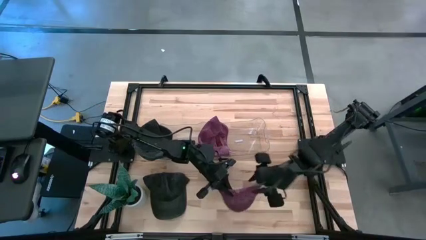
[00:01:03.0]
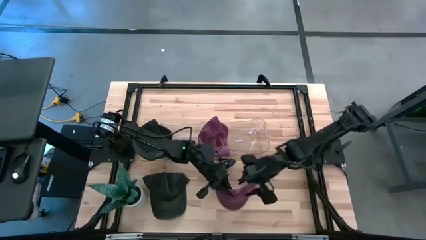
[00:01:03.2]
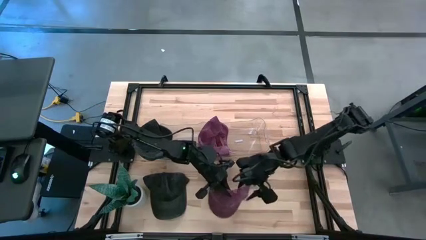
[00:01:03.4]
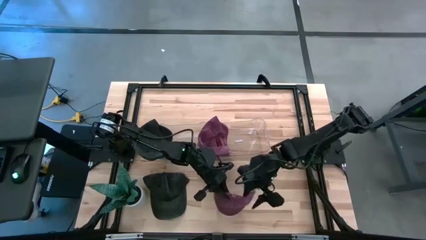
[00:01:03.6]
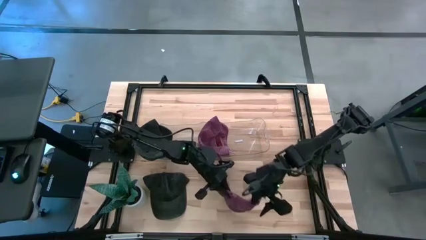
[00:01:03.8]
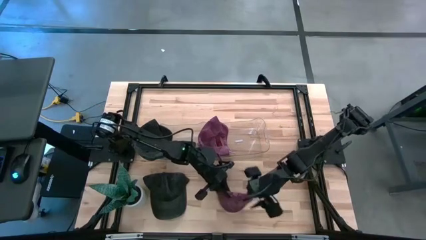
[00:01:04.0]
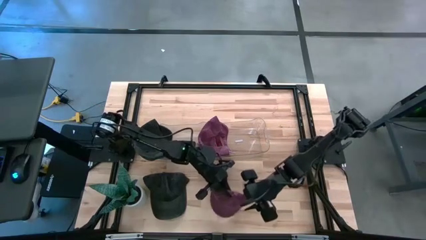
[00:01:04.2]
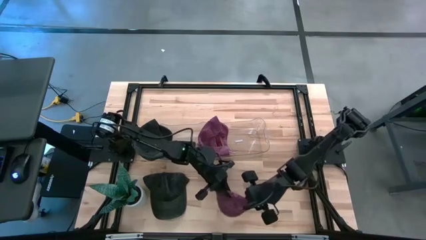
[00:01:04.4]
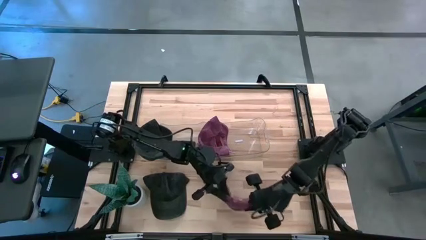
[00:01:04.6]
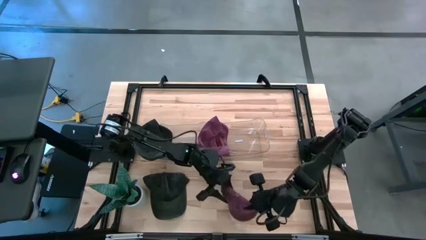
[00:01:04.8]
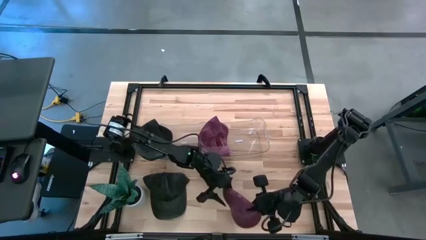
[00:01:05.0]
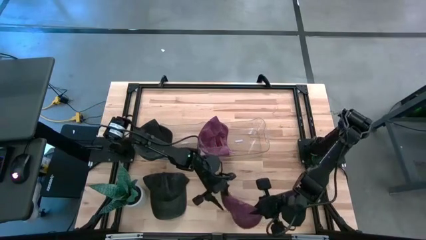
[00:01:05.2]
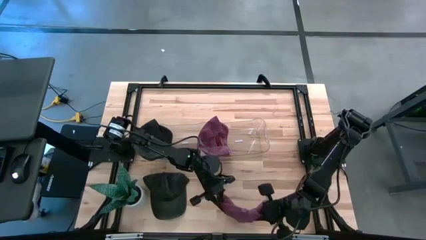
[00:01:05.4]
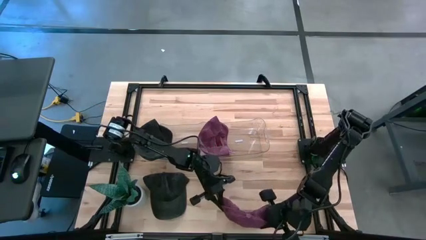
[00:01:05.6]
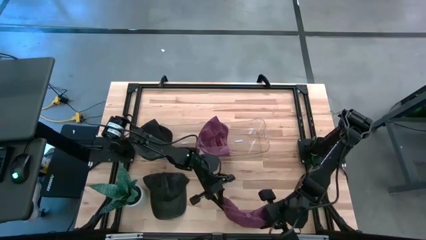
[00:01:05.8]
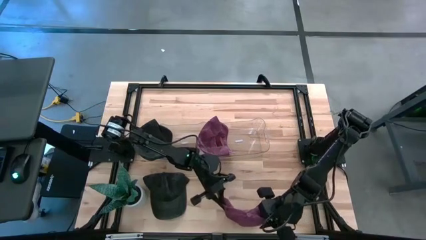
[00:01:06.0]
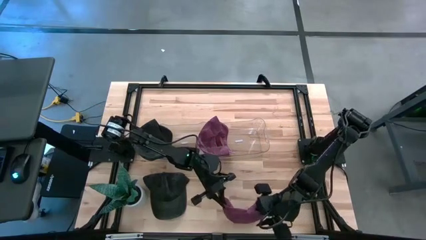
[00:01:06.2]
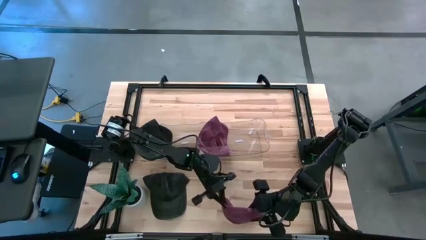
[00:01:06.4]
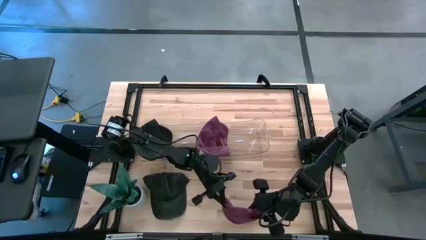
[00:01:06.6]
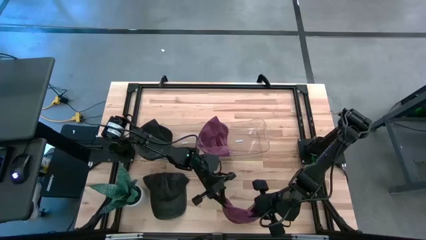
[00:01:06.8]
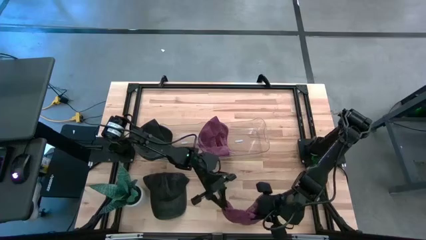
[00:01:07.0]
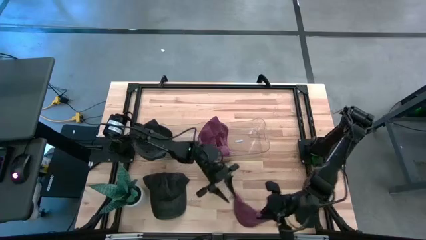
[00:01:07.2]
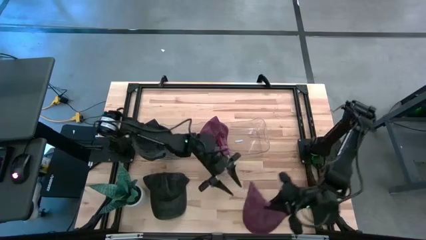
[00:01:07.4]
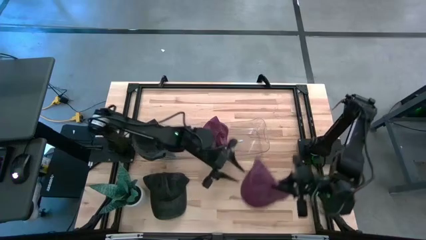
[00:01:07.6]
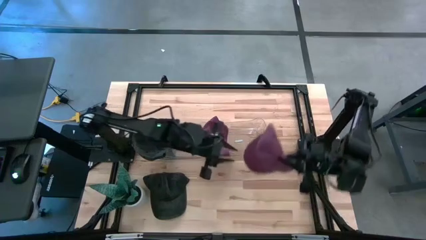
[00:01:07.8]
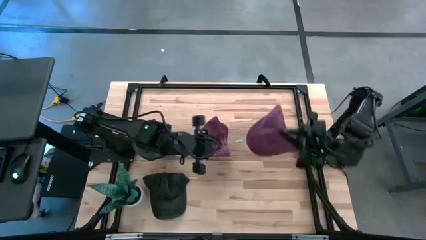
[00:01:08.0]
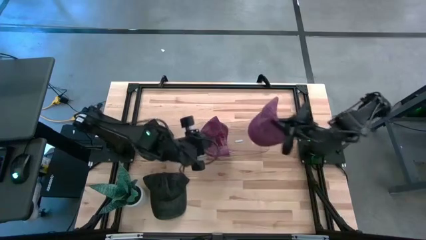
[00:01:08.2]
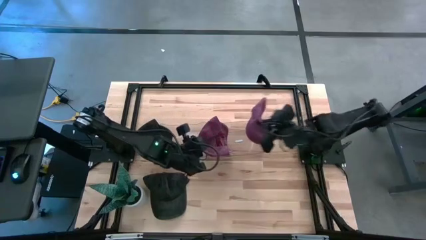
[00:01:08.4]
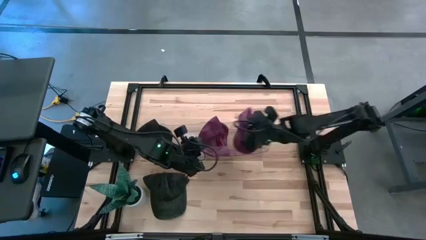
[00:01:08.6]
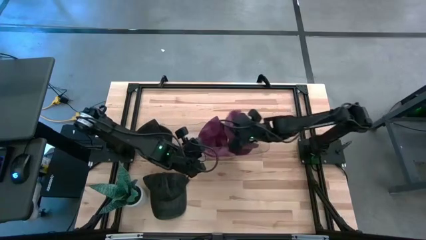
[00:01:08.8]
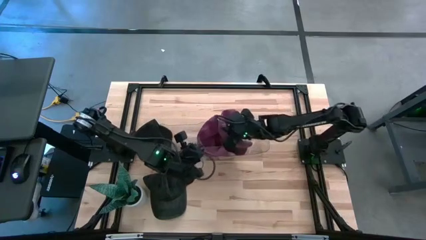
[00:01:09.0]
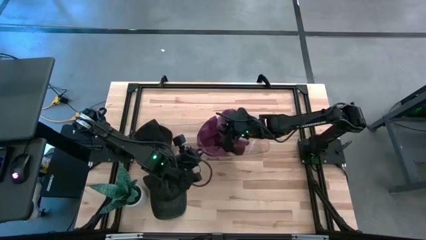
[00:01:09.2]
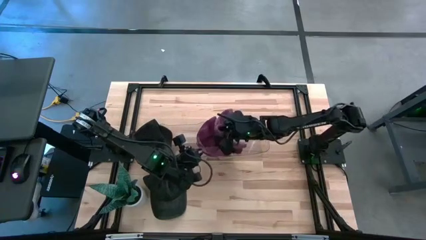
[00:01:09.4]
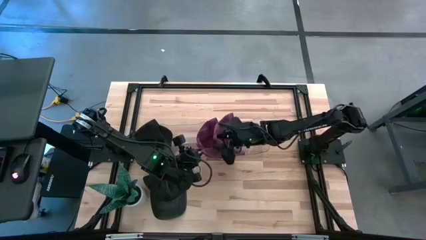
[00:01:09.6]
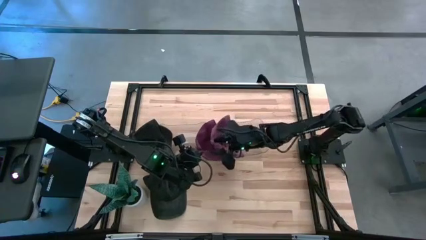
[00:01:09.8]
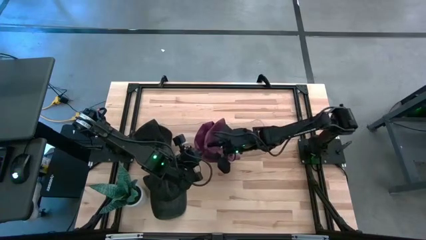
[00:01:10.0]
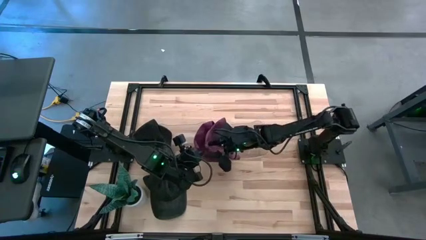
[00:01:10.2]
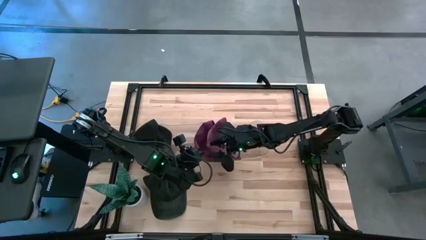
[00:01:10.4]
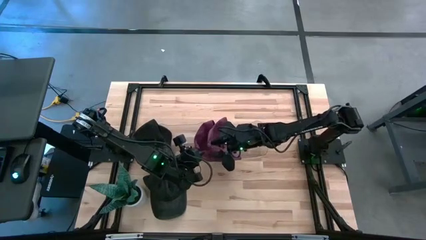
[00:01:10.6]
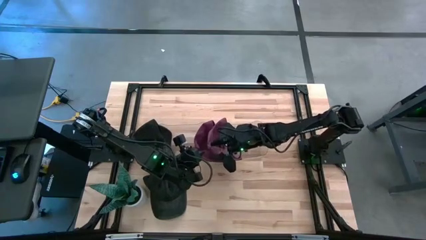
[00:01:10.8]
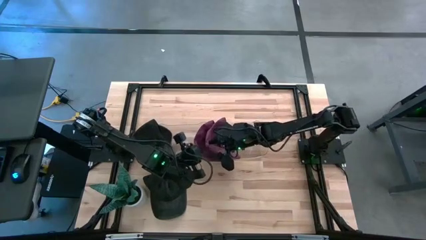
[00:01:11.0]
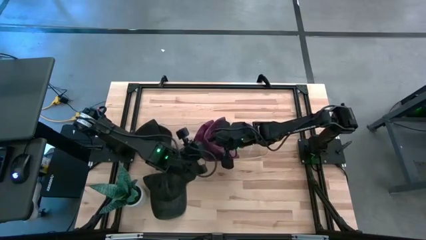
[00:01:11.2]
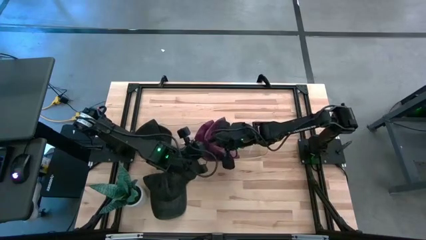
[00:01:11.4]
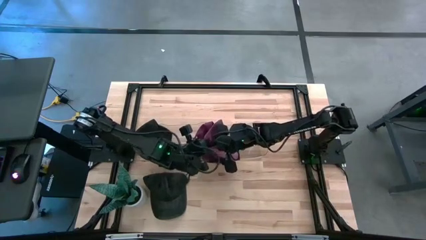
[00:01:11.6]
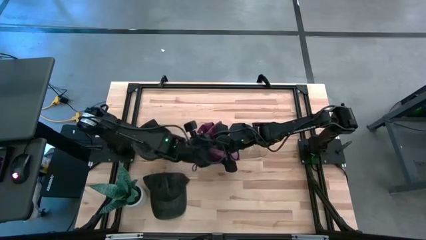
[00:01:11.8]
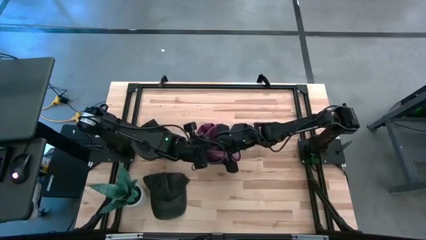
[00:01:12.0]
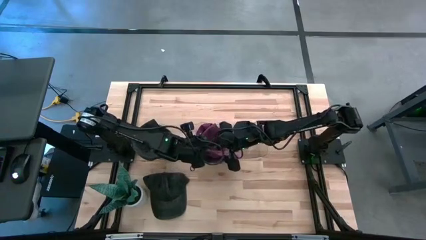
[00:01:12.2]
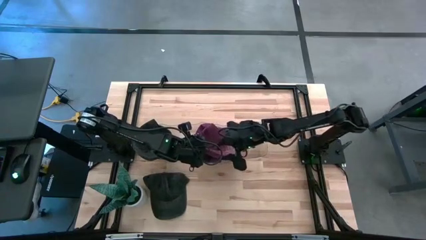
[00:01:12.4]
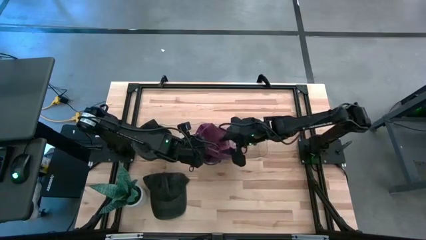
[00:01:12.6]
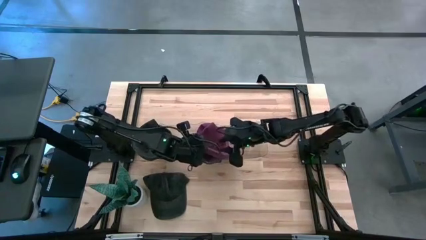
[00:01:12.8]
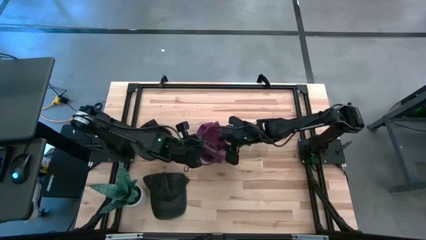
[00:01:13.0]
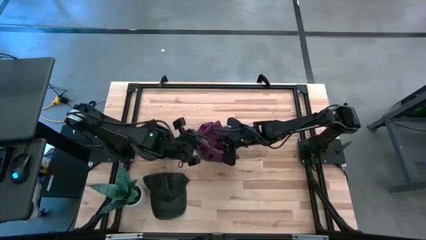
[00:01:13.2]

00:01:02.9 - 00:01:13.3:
Task: Pick & Place hat
Put the red cap into the right transparent bin
